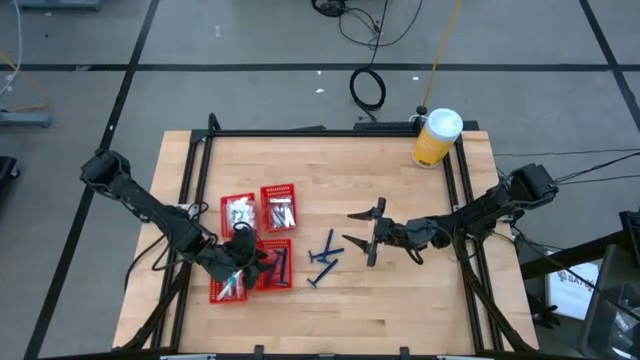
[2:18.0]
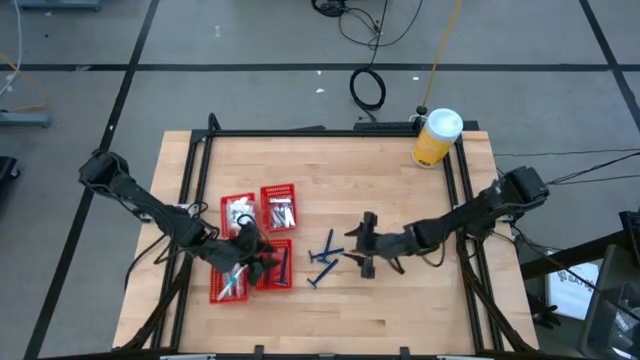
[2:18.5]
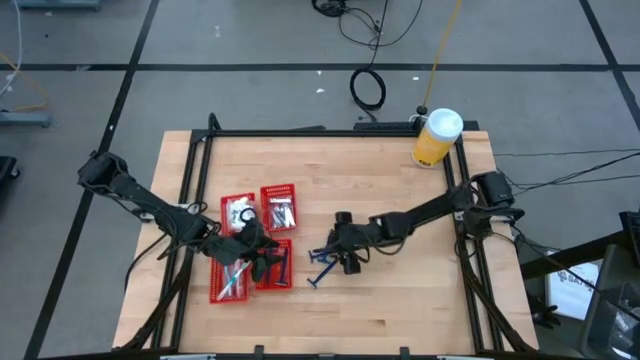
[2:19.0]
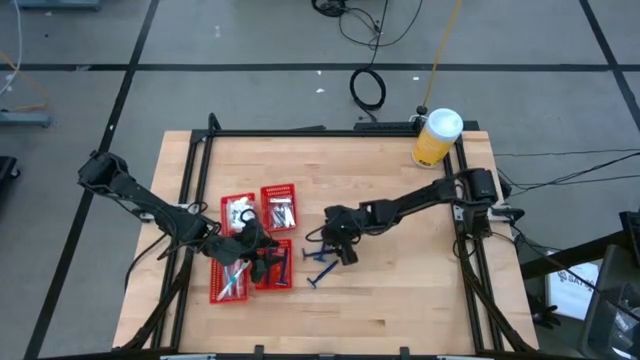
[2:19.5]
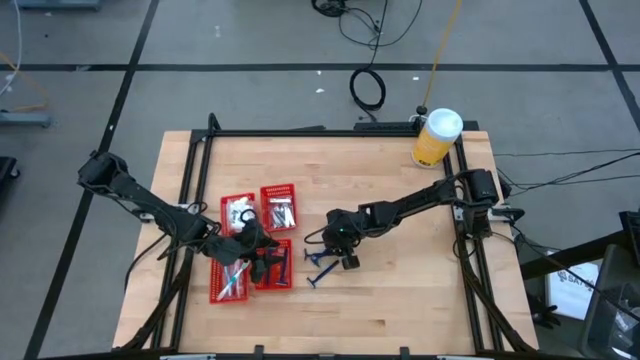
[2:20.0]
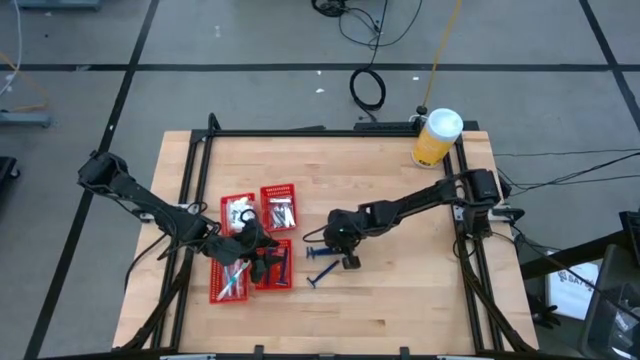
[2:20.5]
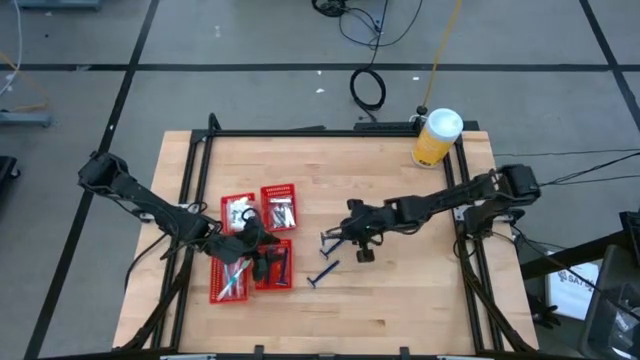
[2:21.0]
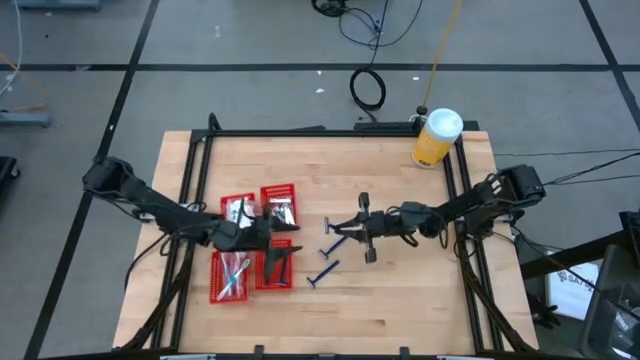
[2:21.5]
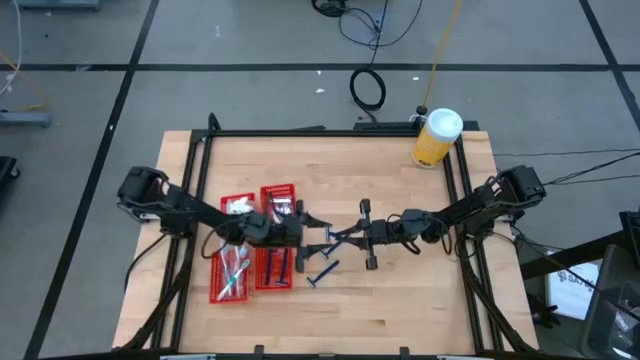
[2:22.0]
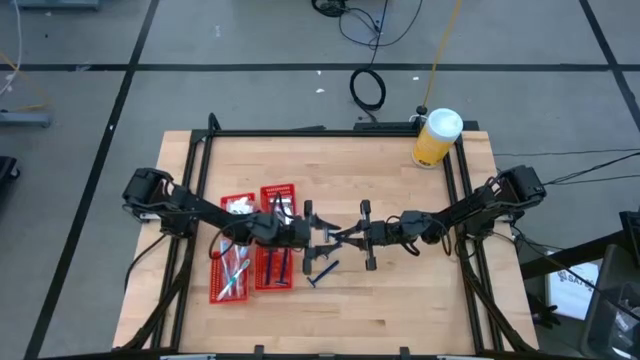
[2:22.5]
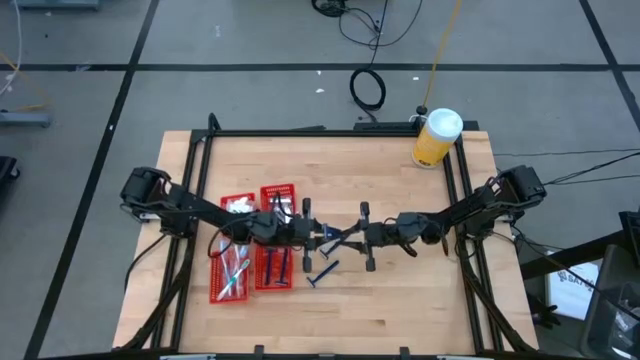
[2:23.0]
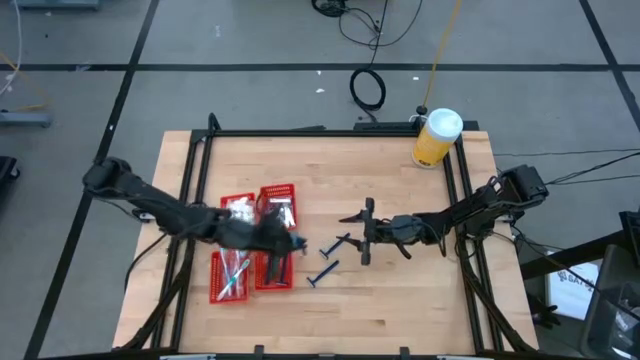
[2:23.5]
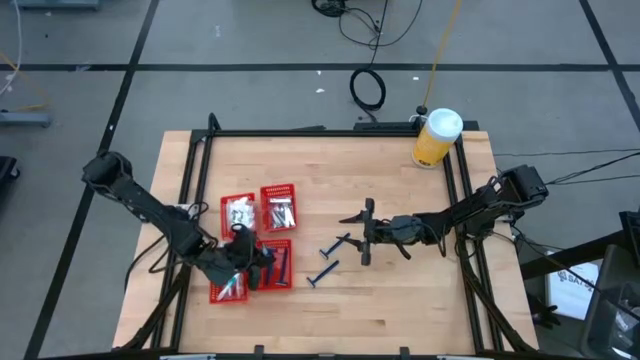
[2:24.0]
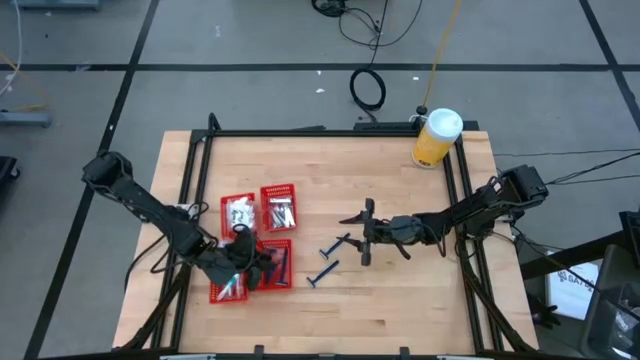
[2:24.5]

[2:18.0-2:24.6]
Task: Pick & Place Travel size toiletries
Put the blue razor into the bottom right red basket

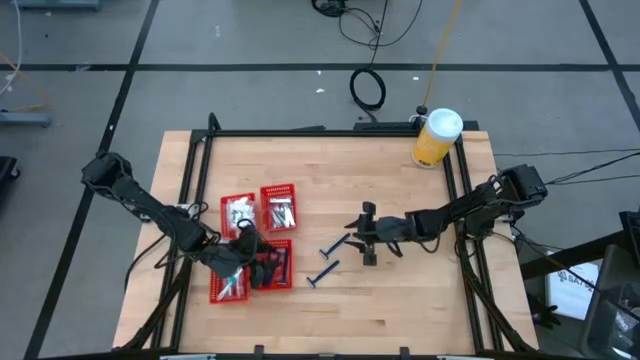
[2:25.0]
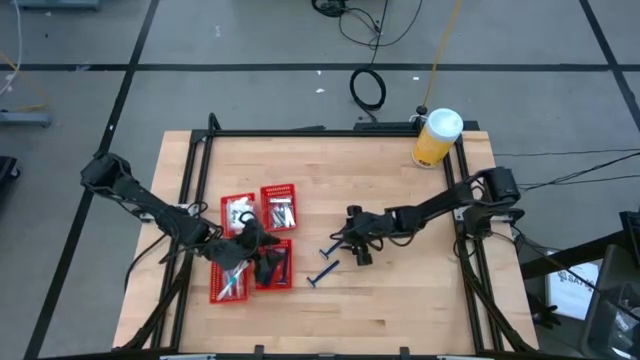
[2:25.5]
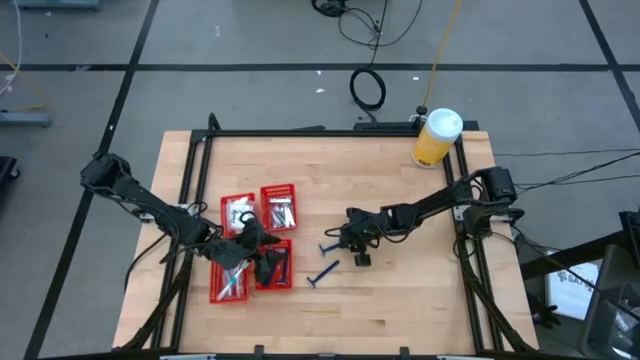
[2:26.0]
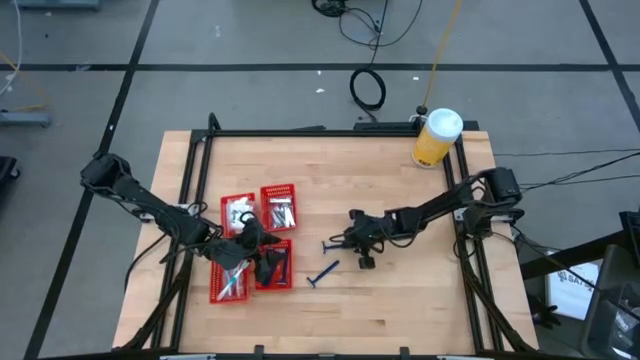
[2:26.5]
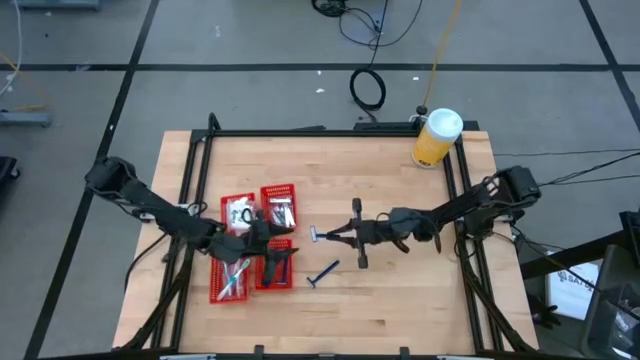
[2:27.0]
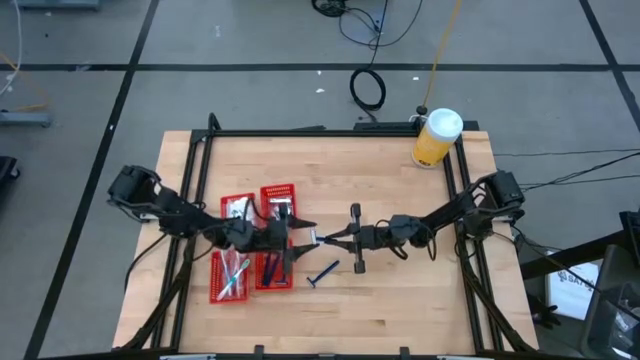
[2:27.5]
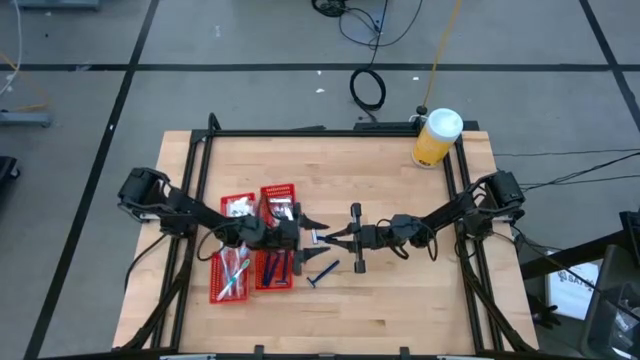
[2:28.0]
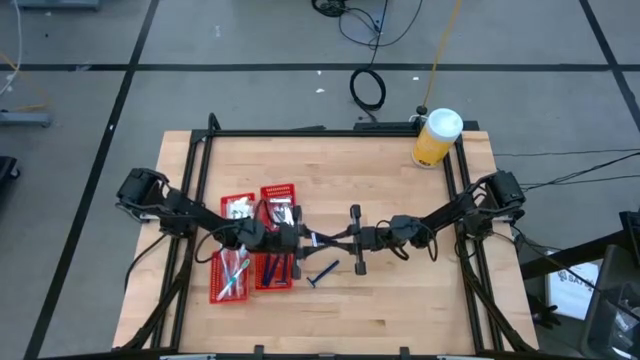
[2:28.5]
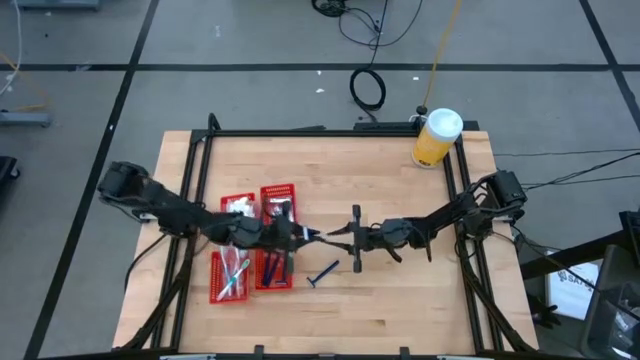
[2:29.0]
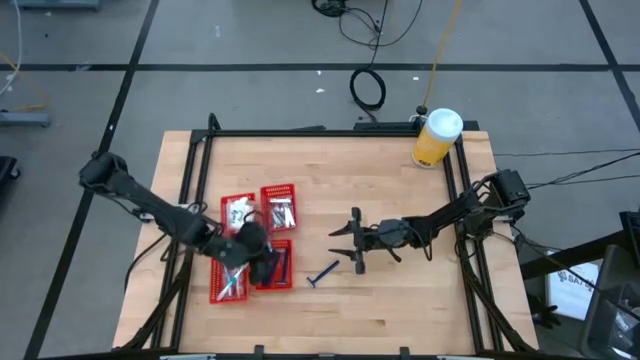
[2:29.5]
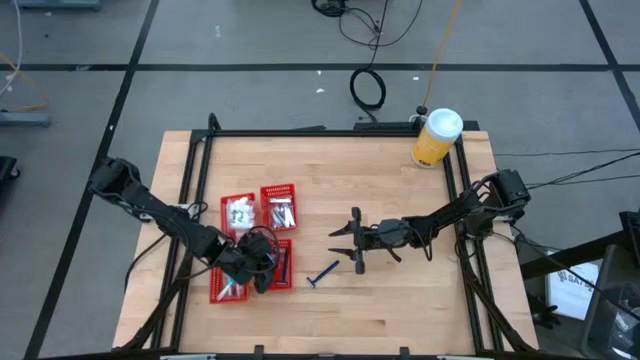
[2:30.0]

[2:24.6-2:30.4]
Put the blue razor into the bottom right red basket

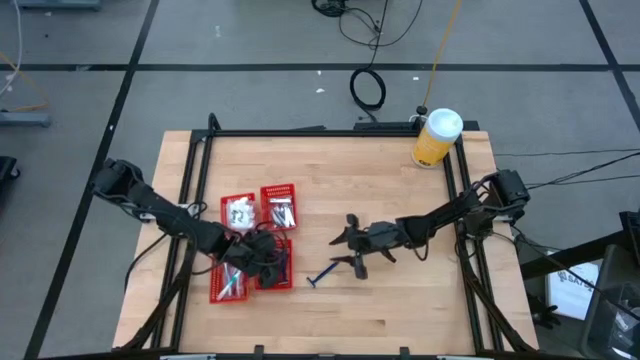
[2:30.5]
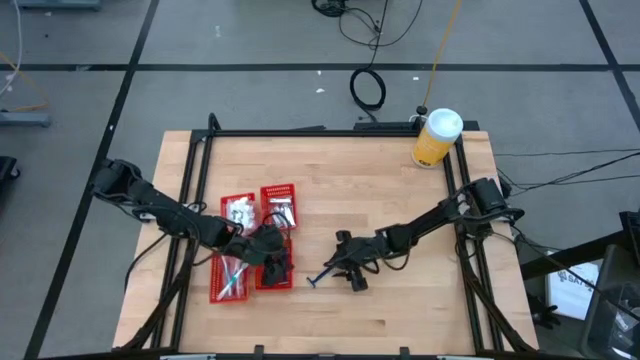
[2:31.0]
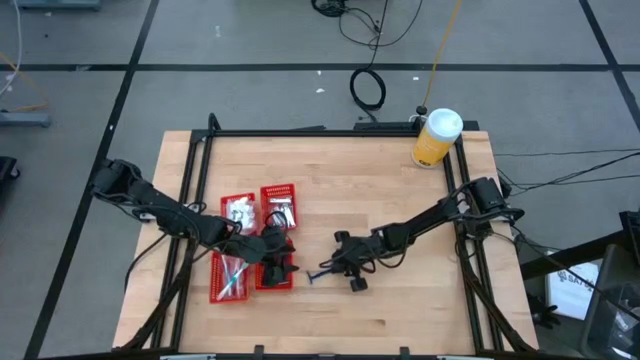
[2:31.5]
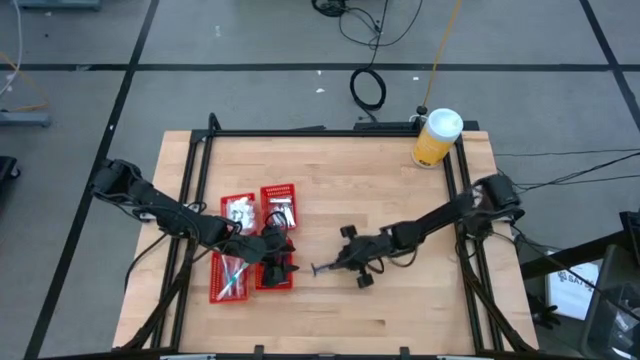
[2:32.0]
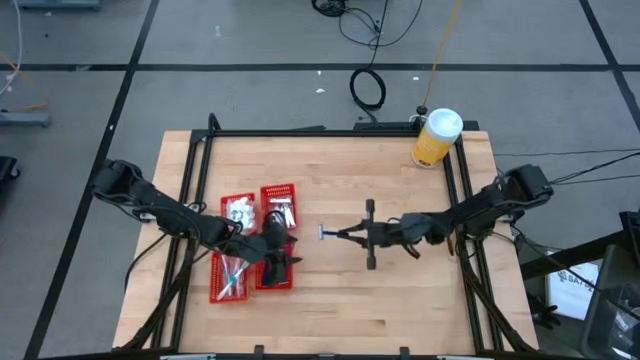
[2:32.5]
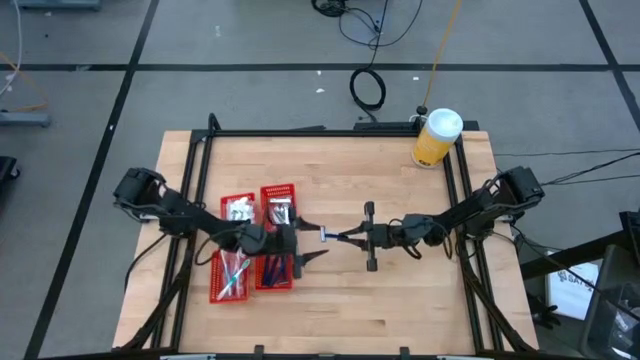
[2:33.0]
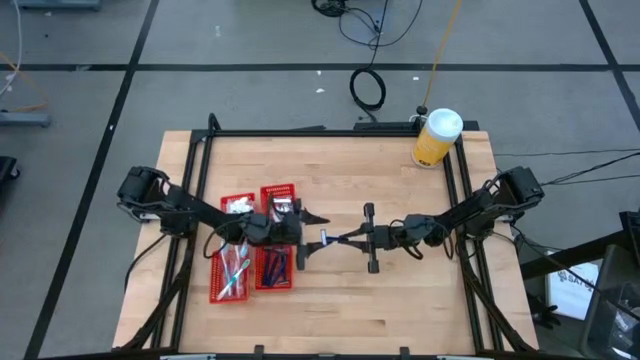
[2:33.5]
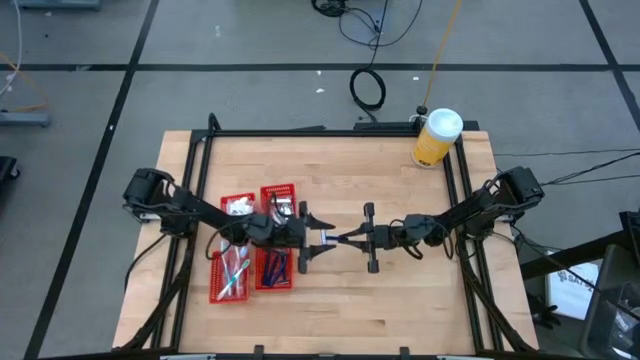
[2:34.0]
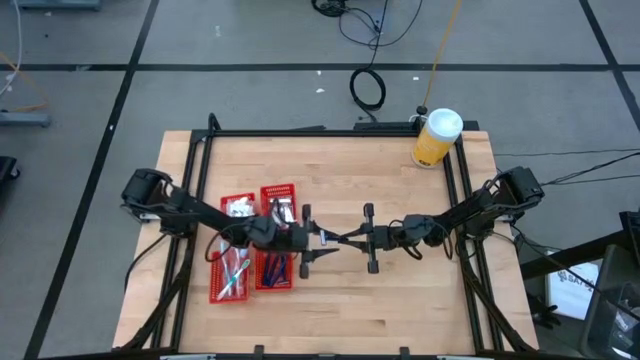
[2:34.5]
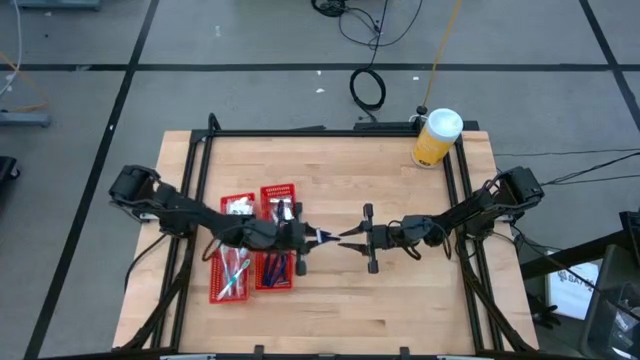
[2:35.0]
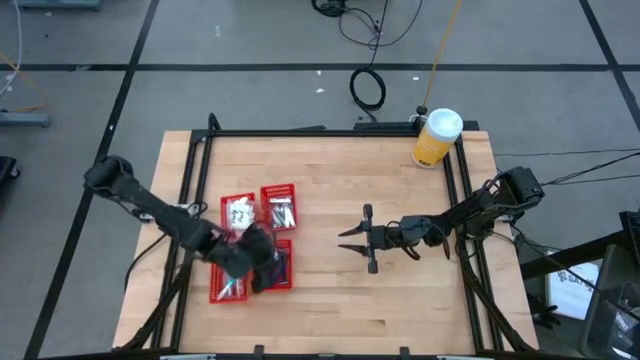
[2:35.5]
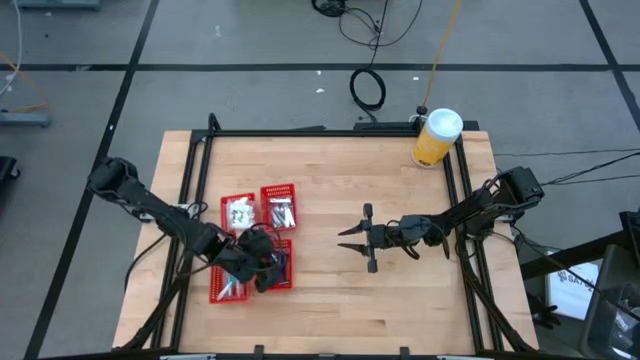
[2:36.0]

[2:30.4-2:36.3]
Put the blue razor into the bottom right red basket
